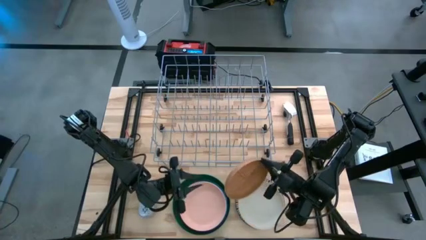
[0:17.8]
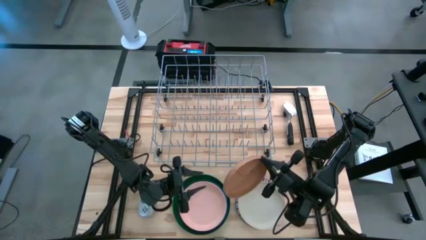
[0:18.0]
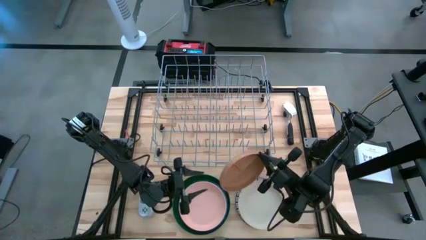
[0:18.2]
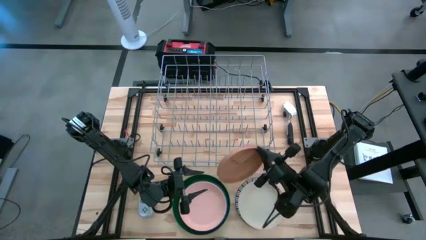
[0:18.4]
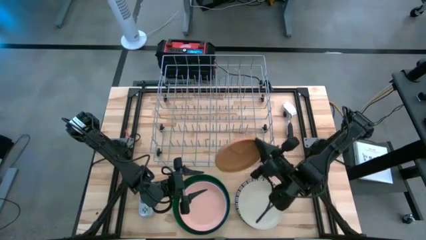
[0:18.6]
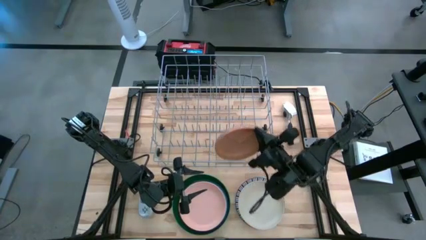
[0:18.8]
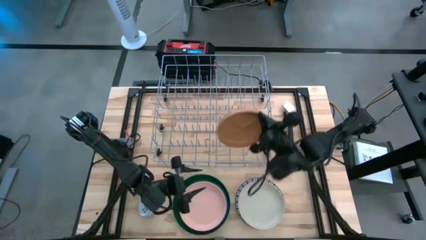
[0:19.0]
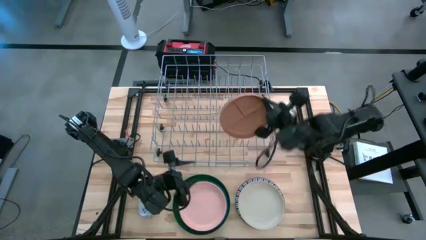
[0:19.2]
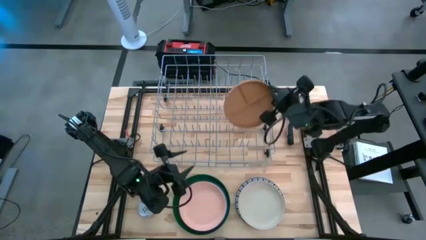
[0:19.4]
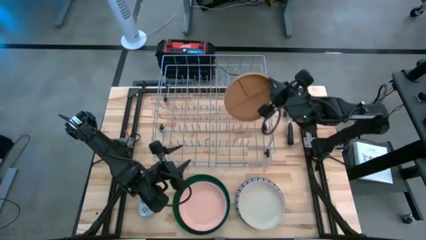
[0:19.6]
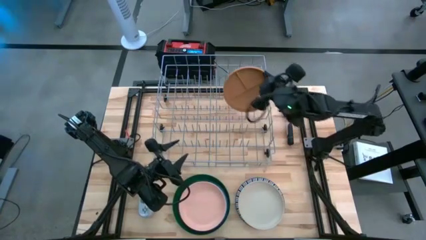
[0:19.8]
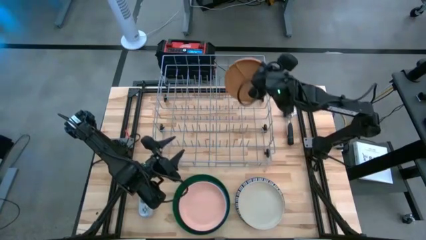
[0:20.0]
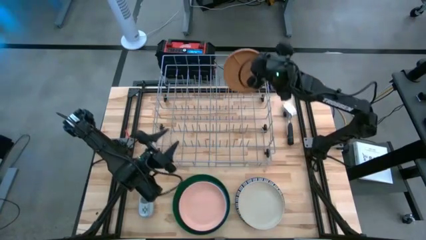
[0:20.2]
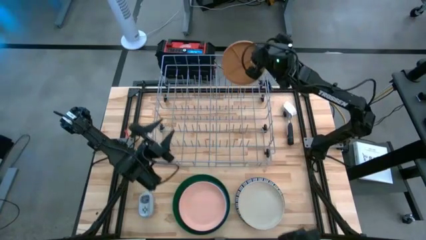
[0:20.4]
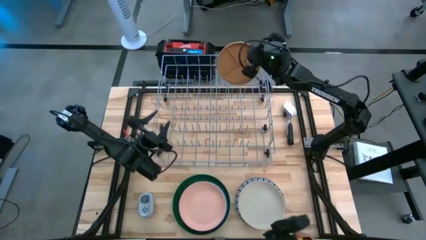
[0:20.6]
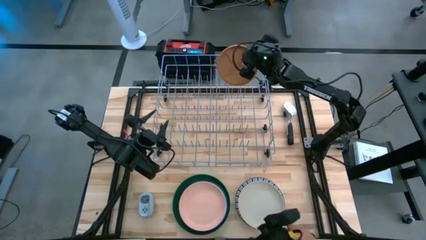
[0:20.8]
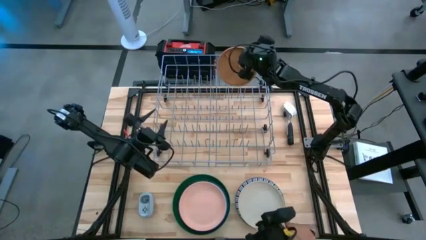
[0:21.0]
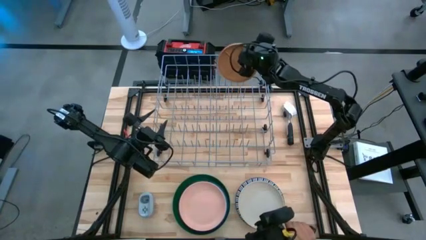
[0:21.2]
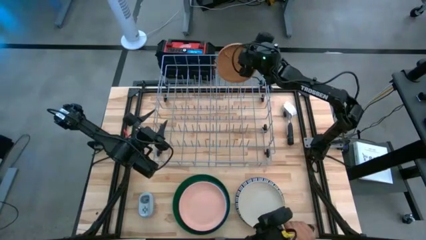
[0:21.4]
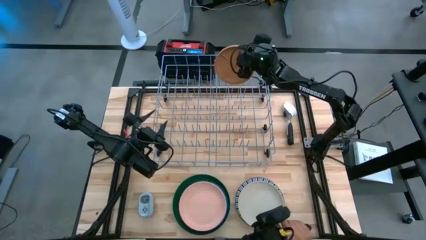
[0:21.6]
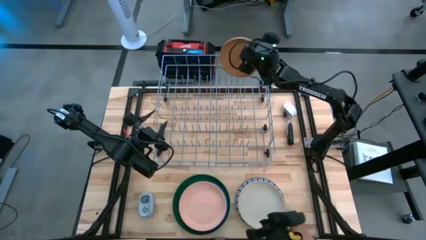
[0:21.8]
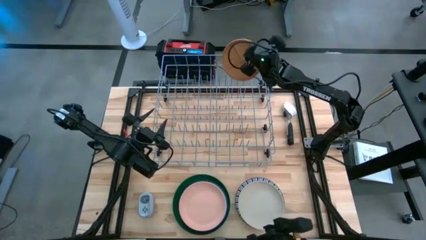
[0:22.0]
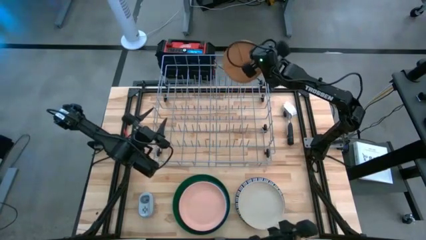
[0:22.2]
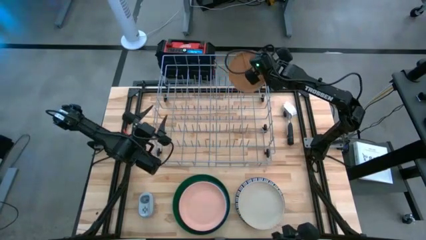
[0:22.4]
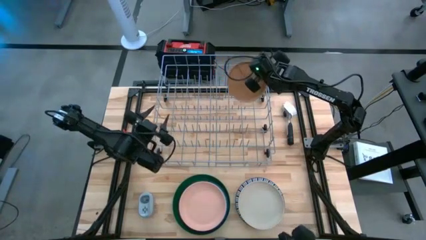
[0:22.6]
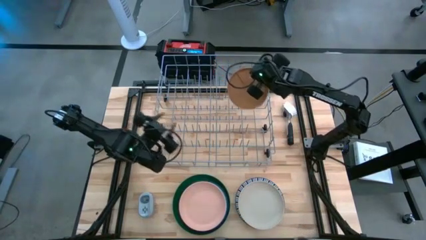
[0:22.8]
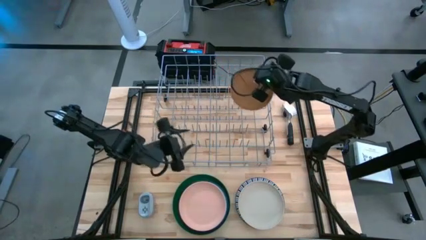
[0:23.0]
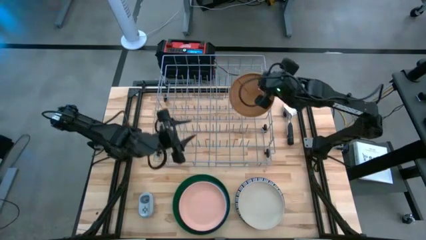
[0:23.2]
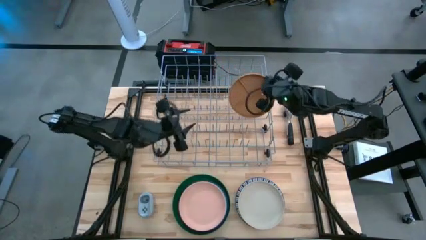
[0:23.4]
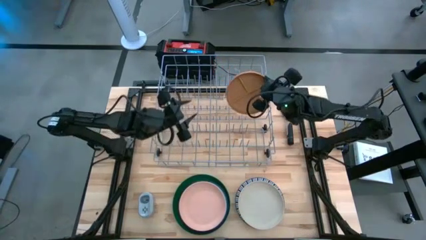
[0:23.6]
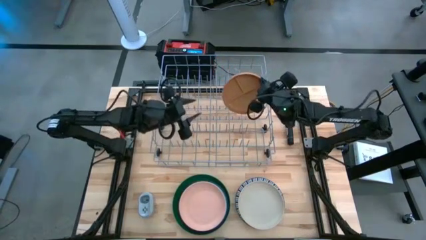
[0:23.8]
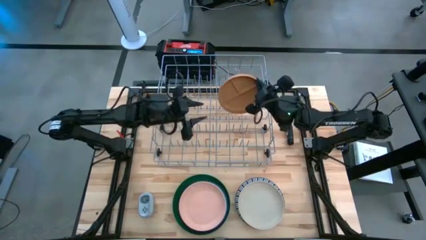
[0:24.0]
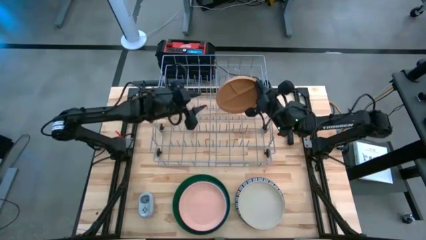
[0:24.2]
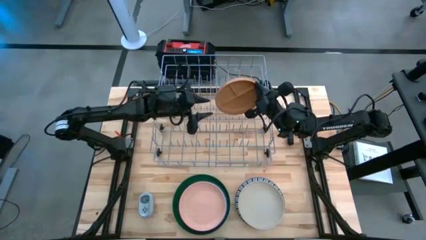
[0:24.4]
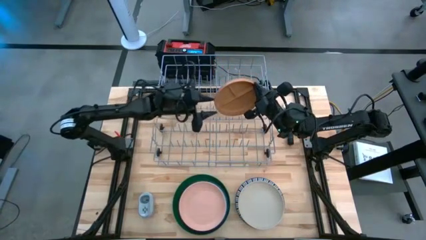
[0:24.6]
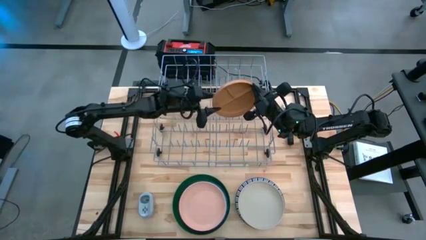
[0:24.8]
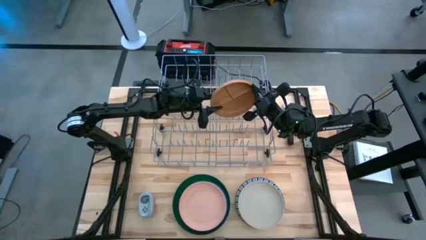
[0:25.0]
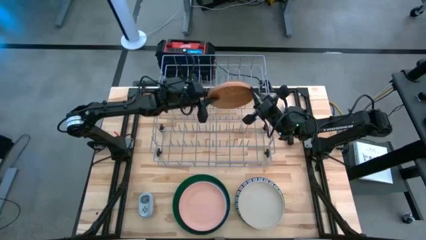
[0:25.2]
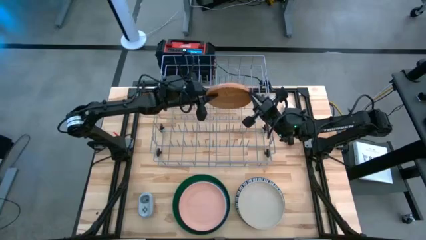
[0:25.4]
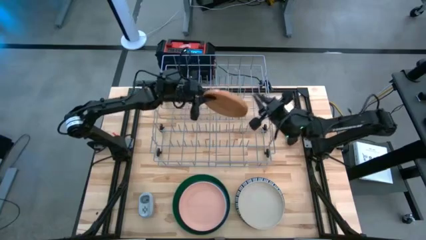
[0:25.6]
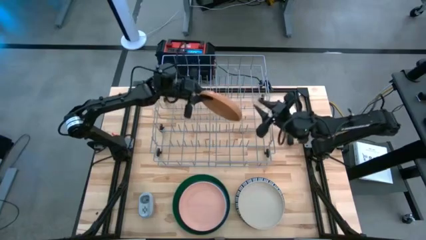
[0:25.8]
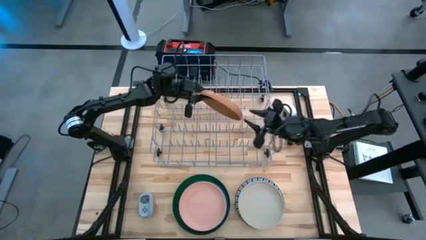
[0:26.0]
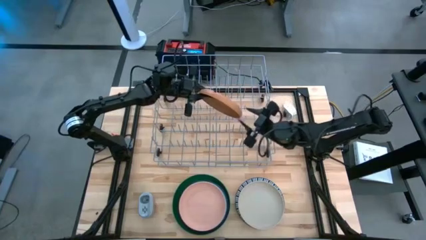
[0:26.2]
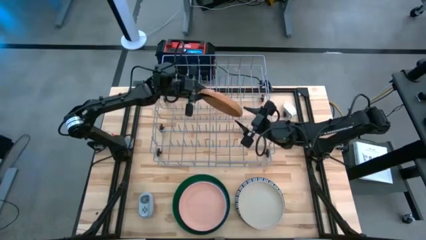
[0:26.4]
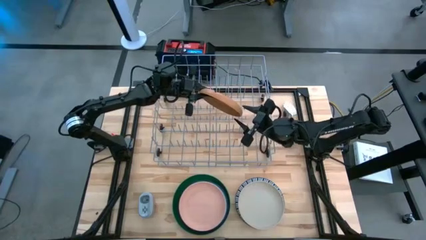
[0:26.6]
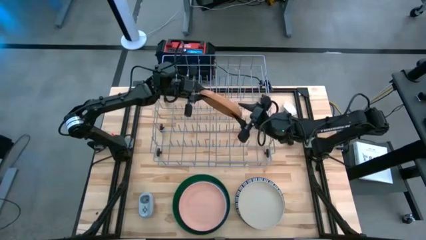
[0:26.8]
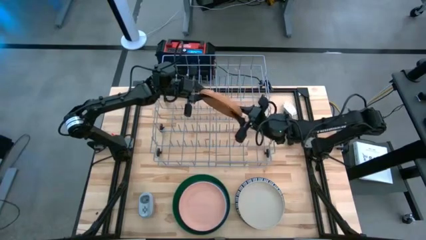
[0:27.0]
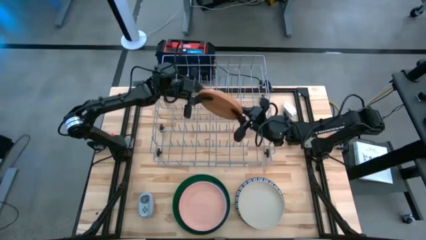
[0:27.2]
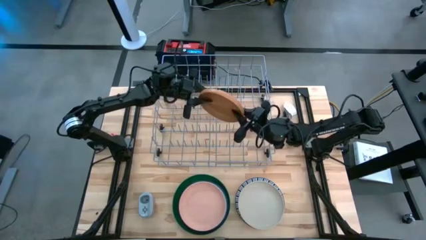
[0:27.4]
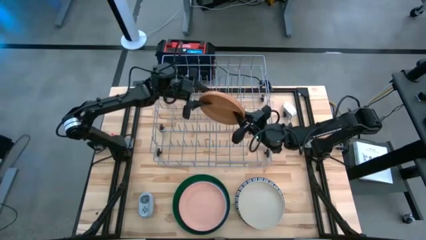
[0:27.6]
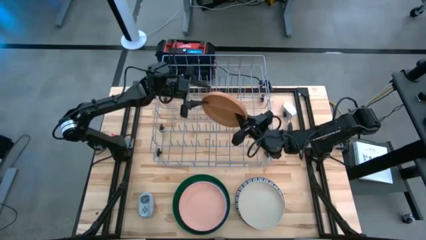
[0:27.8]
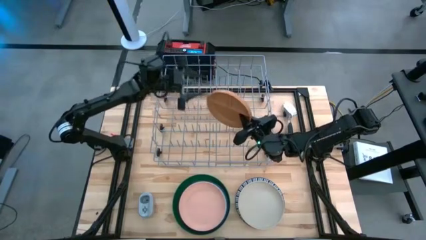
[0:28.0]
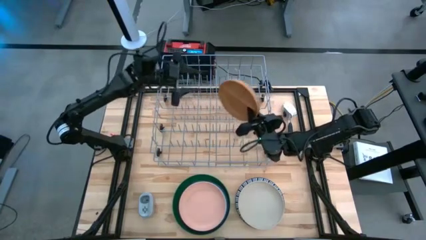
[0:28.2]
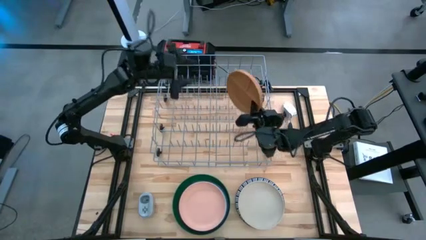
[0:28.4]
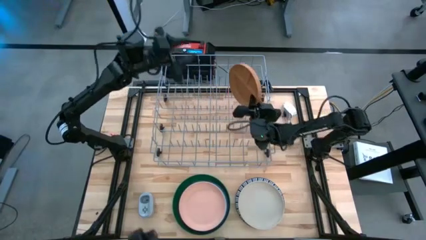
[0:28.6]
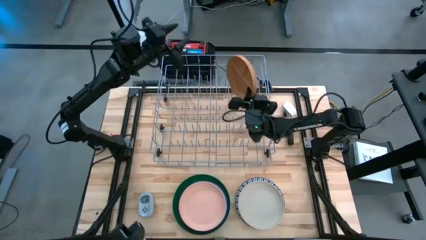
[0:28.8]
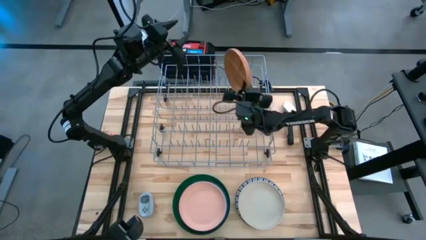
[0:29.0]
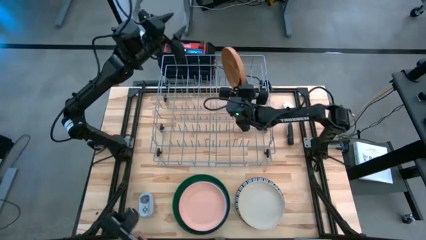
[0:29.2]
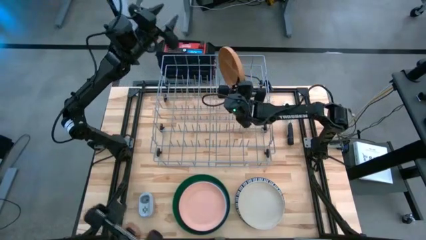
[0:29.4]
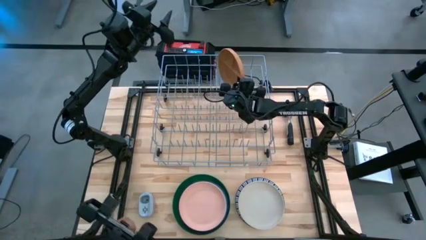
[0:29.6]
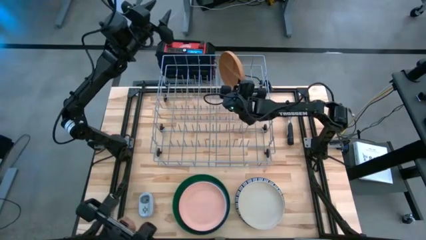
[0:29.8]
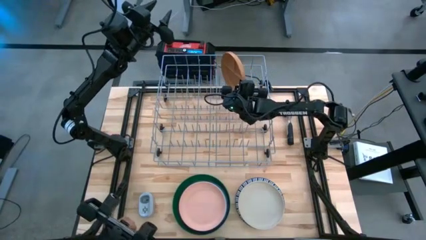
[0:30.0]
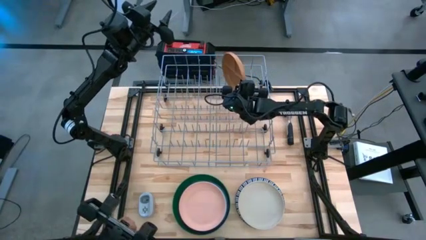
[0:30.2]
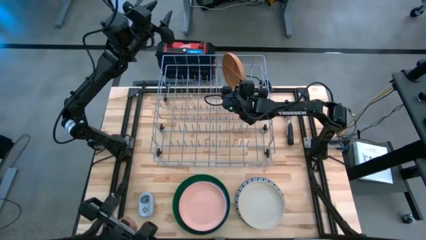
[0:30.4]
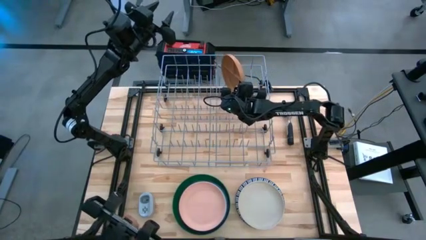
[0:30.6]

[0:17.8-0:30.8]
Task: Sort dishes
Put the brown plate into the dish rack
